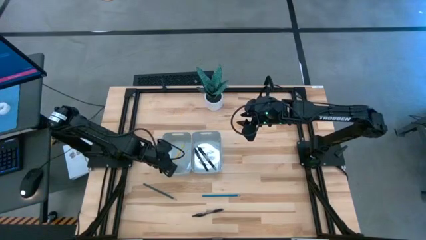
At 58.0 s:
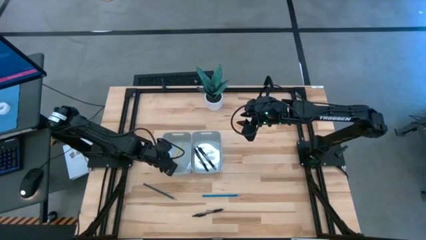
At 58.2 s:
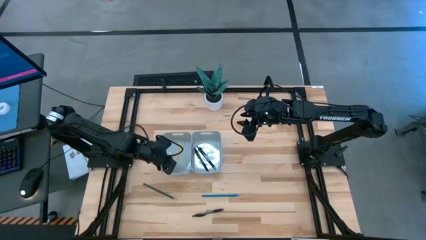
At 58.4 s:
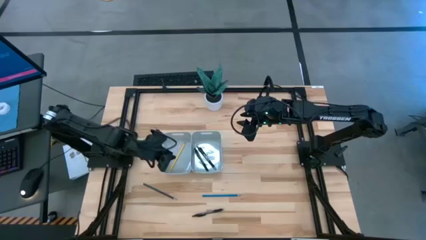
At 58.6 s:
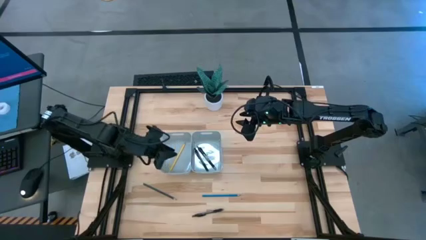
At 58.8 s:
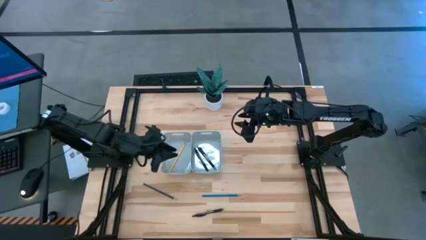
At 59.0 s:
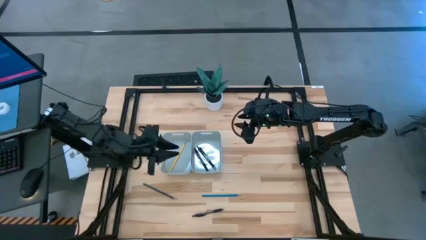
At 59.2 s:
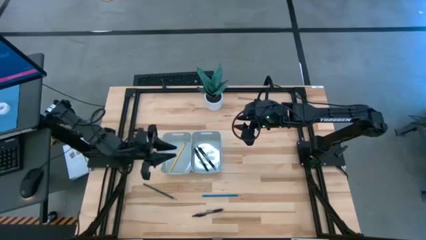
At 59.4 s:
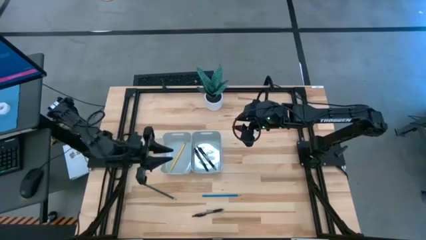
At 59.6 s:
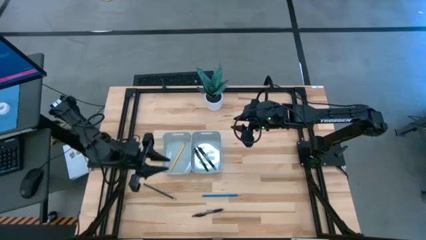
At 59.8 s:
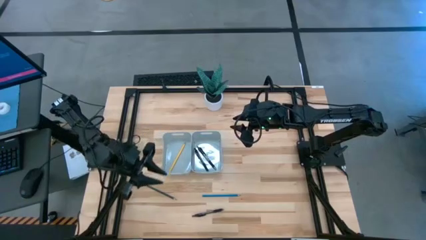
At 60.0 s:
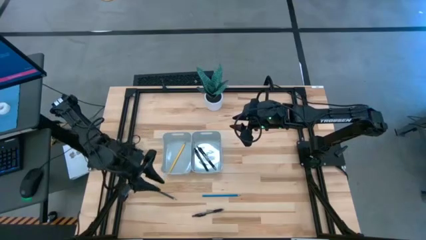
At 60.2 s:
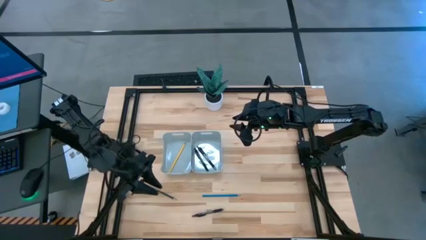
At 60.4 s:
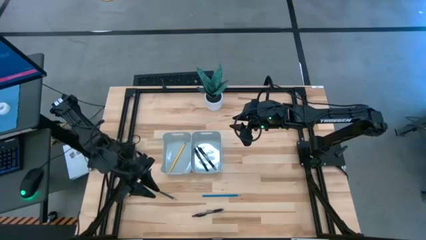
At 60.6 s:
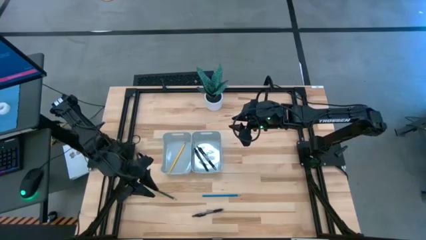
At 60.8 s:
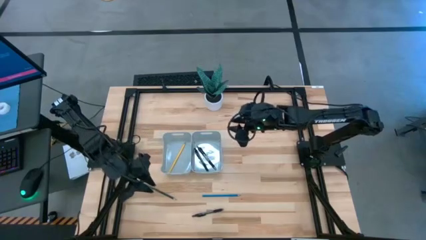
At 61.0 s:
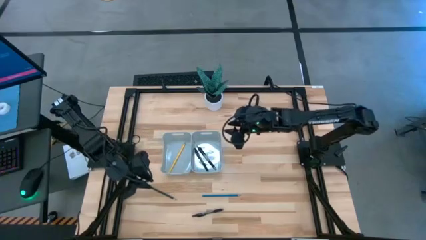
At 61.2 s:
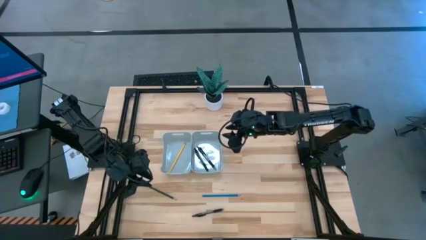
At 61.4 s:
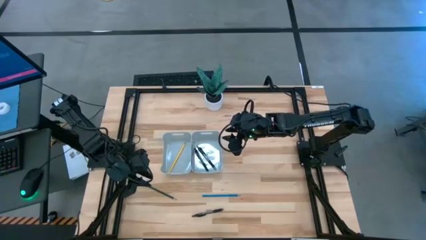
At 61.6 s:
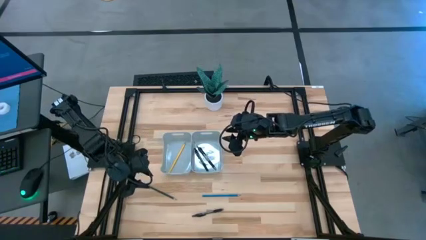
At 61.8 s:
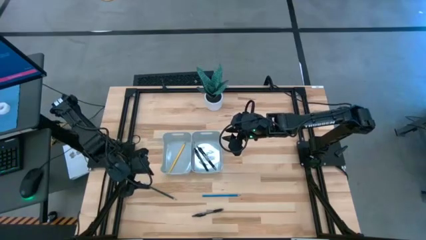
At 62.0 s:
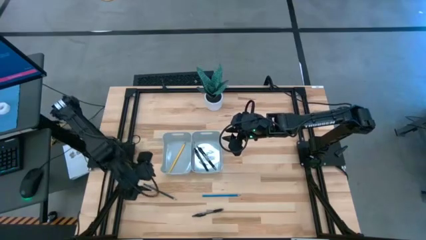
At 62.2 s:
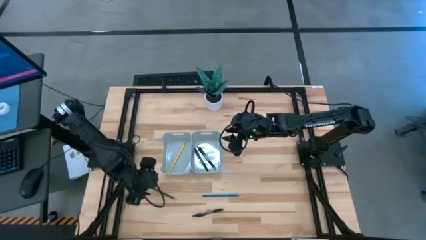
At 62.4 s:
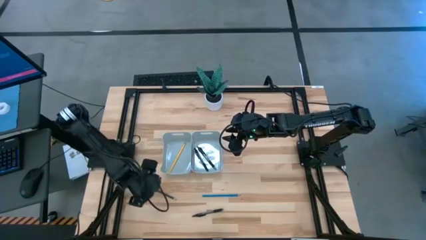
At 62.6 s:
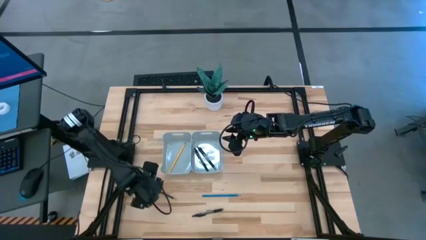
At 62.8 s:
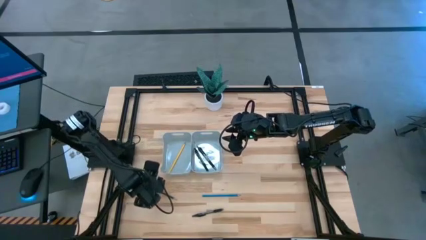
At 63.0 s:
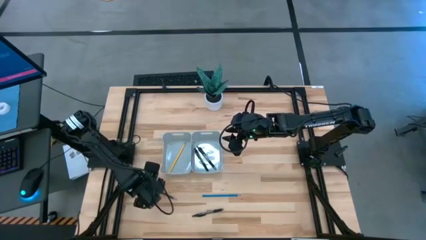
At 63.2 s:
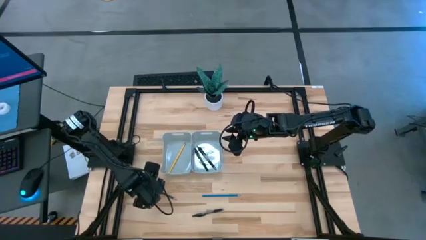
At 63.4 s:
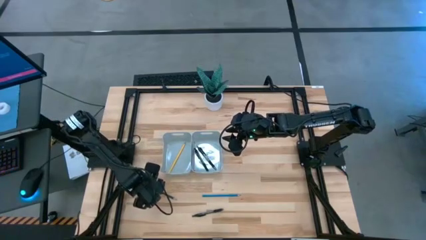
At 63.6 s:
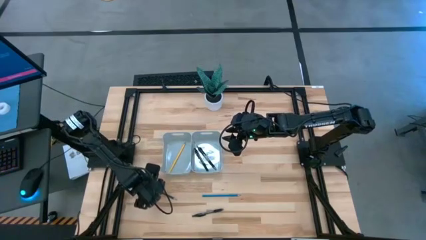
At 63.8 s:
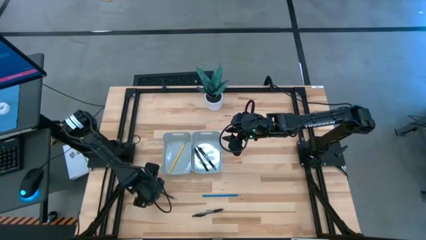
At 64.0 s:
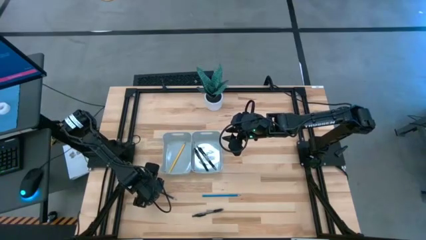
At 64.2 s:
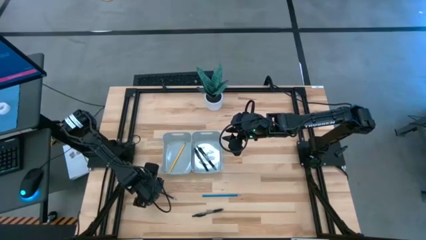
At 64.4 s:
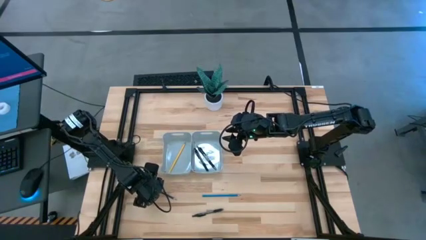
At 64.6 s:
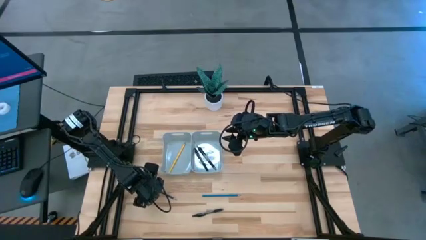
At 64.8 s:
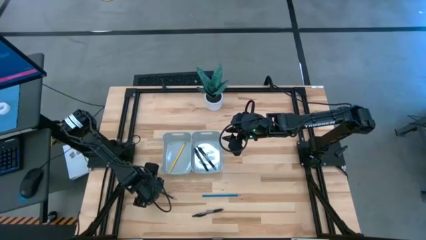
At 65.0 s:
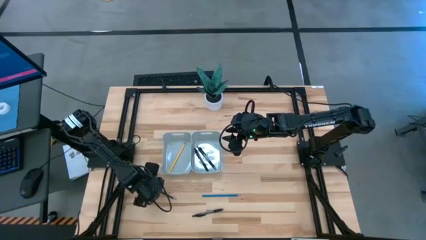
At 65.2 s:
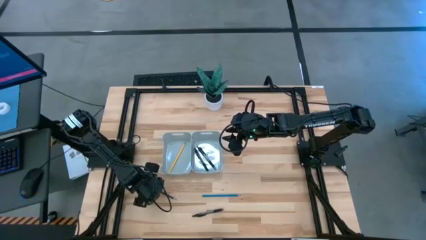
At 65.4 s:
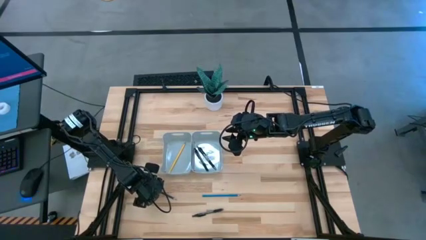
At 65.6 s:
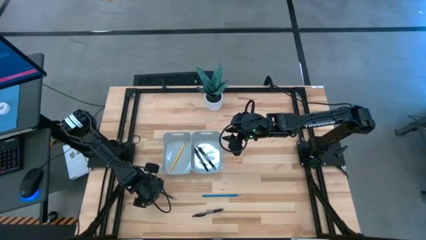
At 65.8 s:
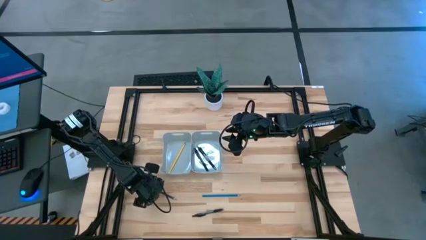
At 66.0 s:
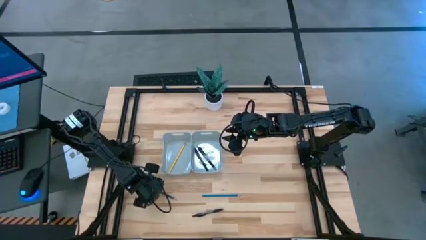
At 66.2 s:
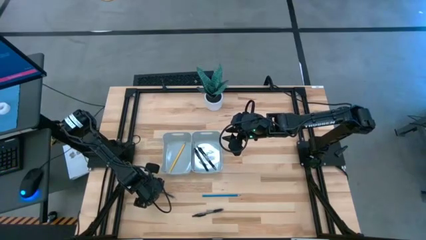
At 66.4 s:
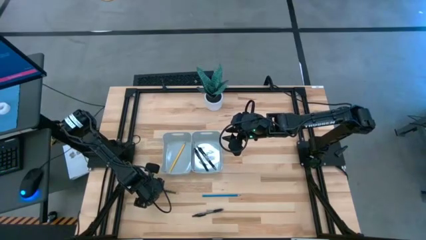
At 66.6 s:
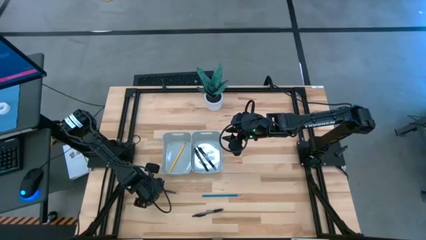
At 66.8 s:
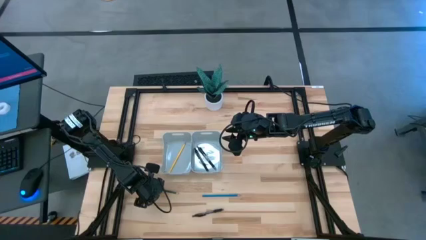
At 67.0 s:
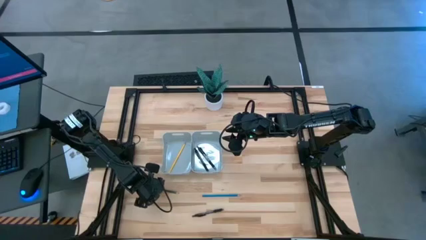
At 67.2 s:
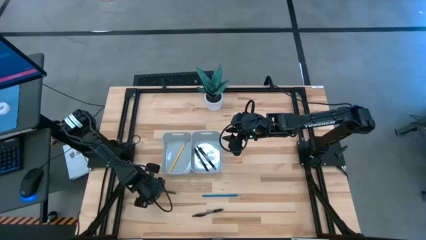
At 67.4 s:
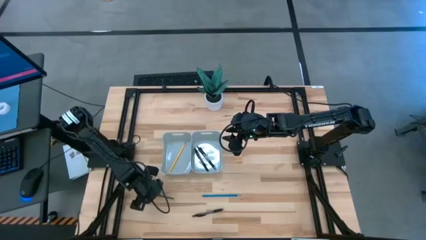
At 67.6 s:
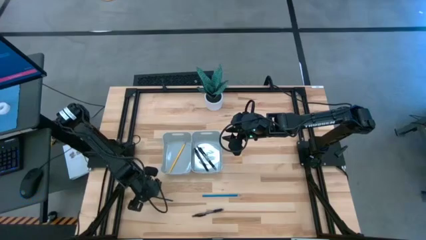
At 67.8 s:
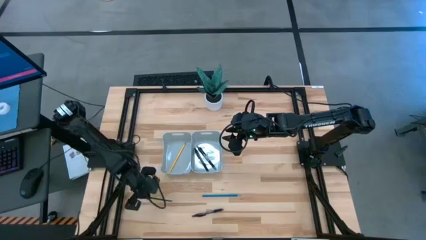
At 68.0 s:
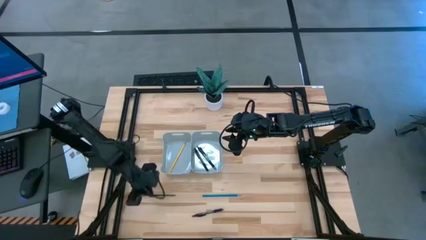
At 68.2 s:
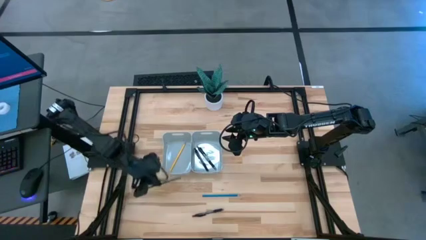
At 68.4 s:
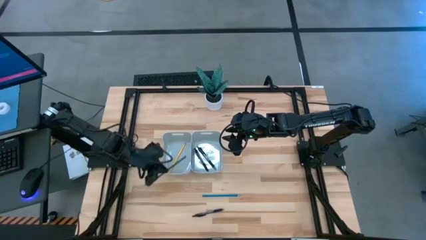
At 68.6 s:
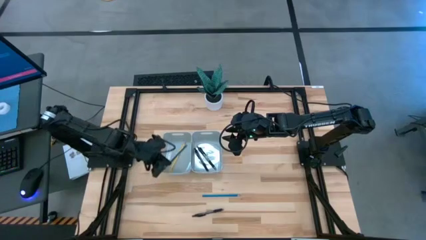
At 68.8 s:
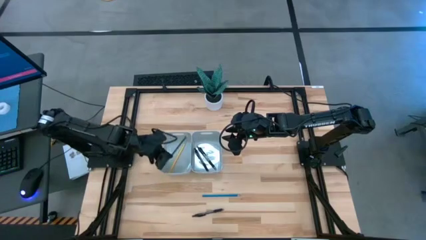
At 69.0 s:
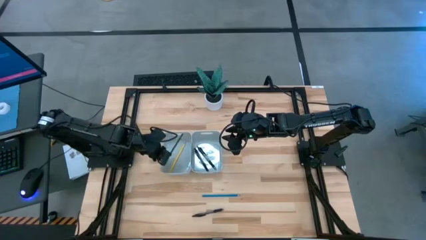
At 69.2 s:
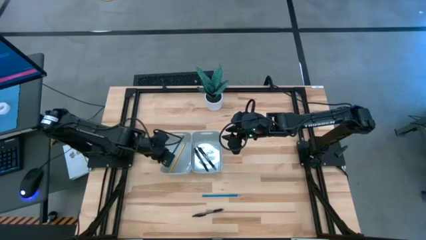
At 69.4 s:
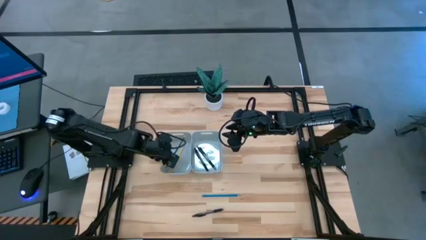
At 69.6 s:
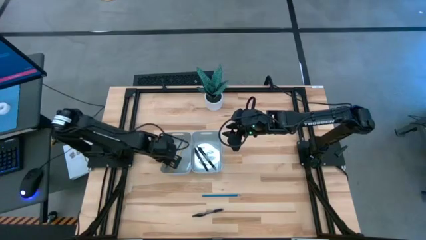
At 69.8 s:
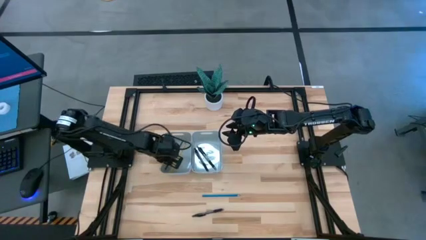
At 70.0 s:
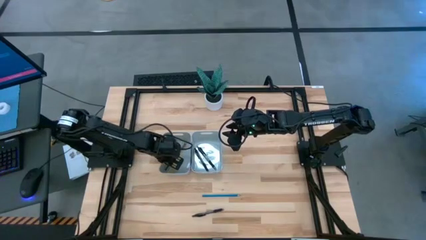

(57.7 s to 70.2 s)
Task: Sort pens & pencils
Put the green pencil into the left gray bin

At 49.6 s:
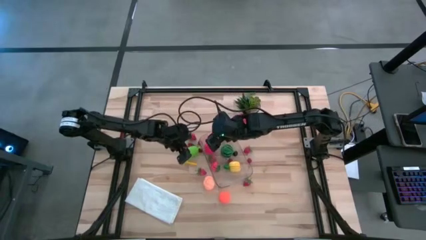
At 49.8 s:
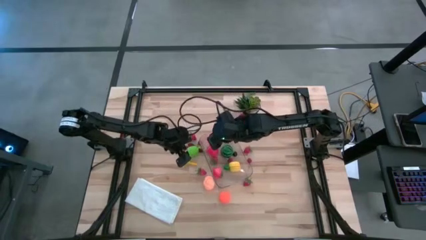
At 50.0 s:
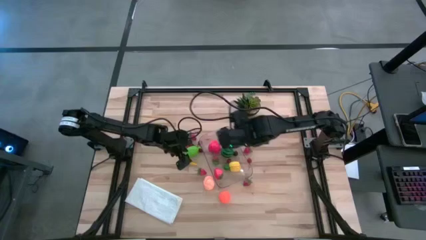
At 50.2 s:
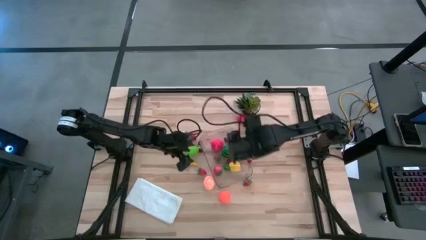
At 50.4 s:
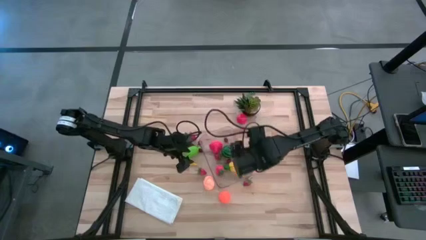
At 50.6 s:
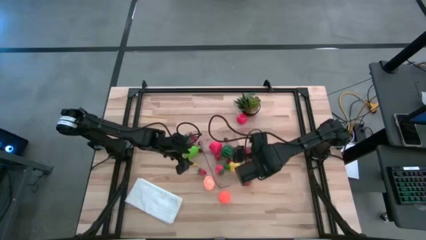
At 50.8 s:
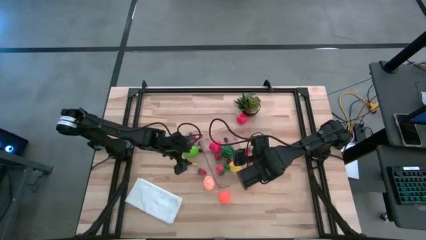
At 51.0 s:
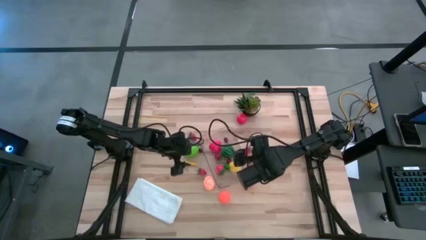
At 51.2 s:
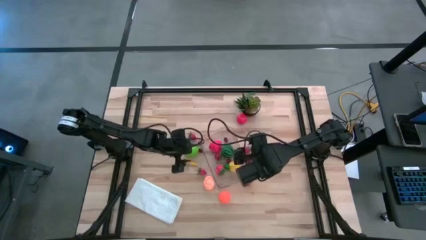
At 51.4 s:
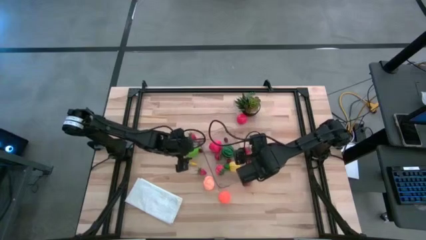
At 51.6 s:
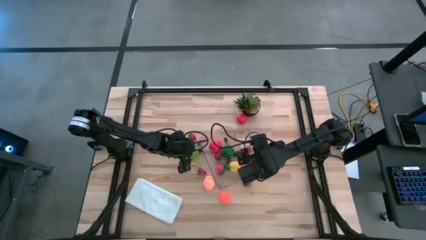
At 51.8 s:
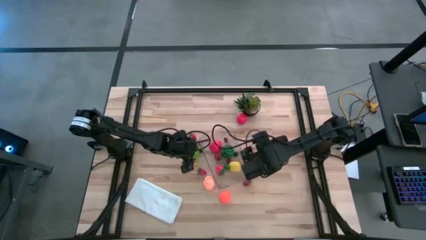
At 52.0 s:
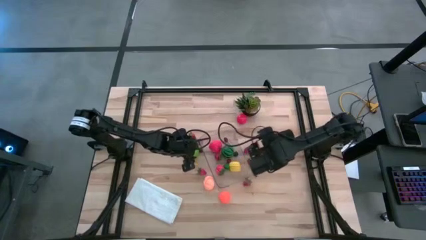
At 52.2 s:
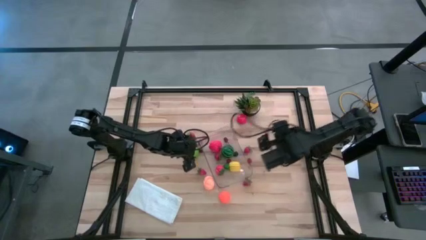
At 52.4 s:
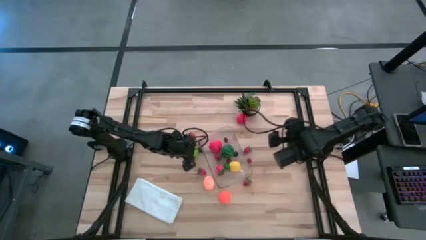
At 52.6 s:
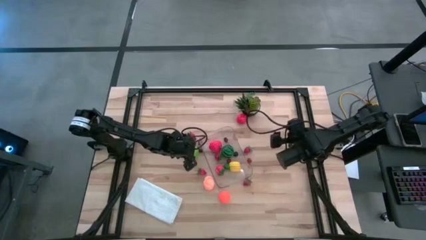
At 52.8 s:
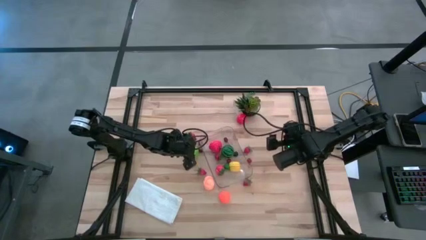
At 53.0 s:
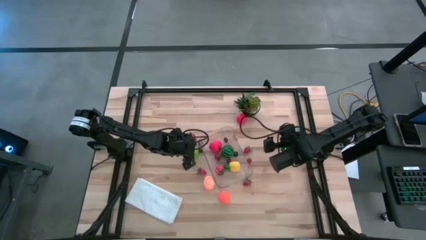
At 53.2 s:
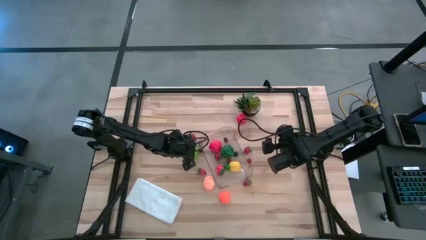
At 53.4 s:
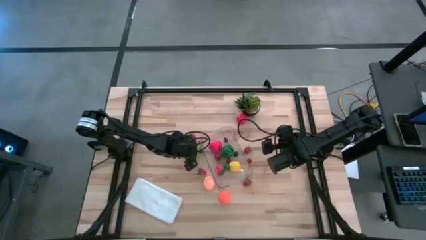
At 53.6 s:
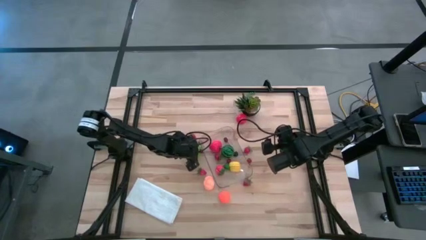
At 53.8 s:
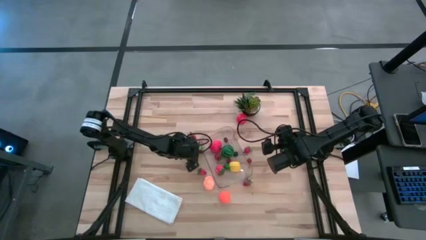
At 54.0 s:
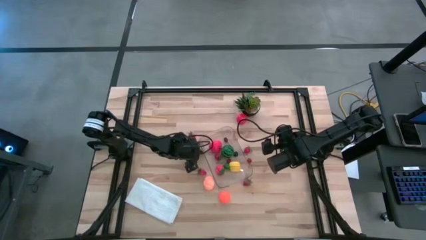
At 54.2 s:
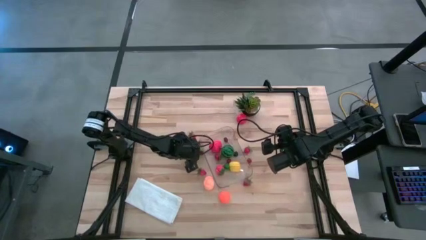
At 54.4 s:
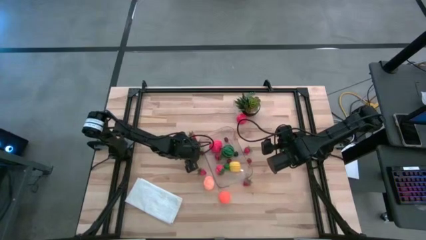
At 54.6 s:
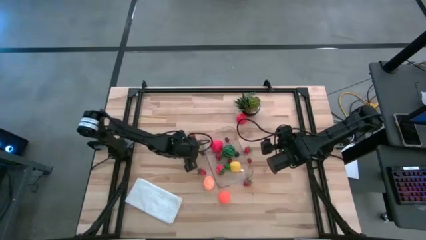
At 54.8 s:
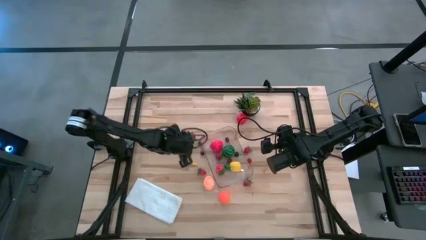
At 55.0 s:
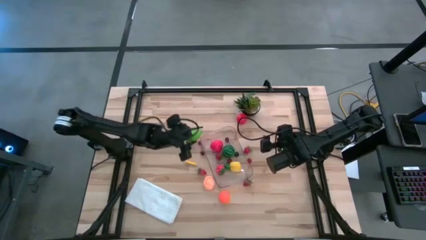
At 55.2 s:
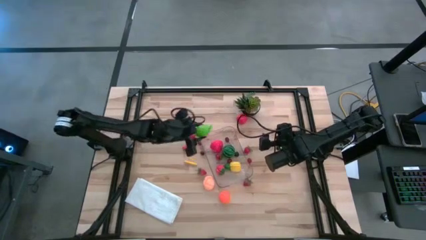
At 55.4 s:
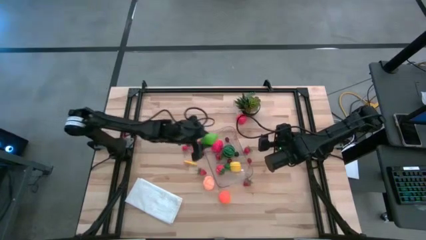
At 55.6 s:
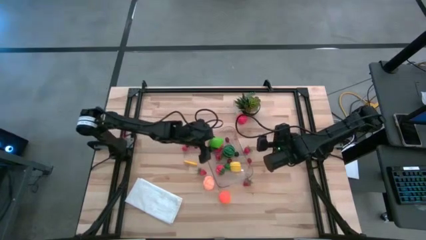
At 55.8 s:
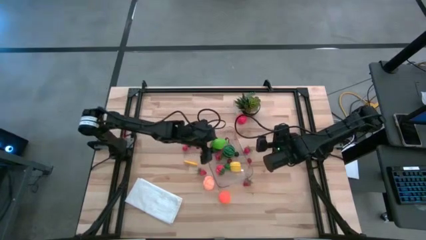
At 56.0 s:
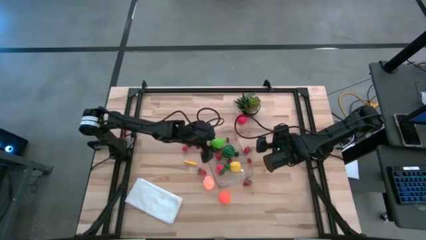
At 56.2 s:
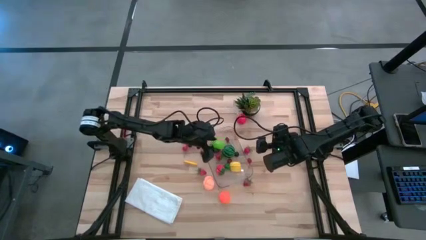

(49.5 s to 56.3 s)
Task: Pick and placing Produce into tupperware
Put the green melon into the transparent bin
